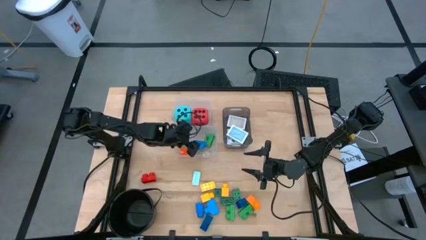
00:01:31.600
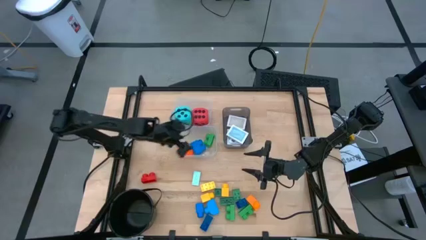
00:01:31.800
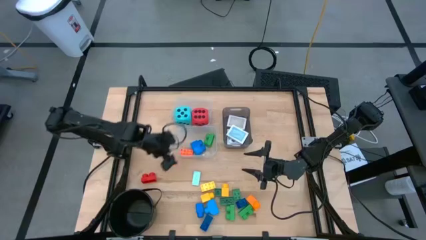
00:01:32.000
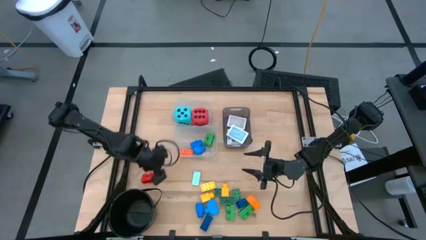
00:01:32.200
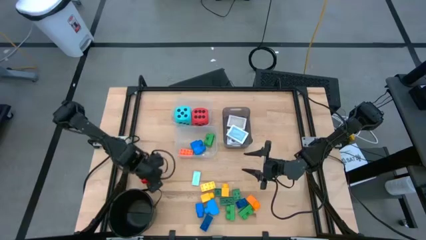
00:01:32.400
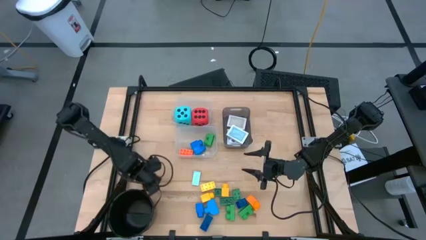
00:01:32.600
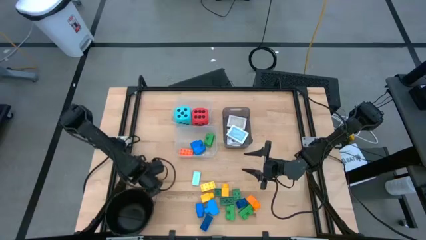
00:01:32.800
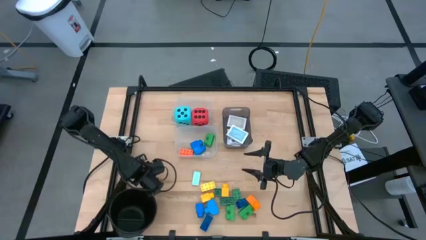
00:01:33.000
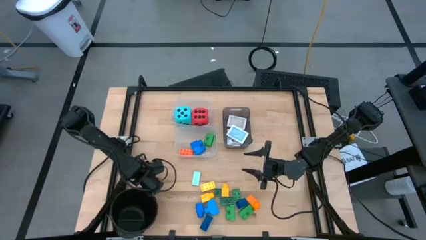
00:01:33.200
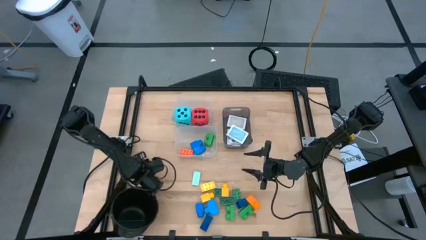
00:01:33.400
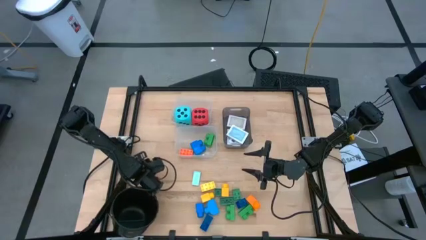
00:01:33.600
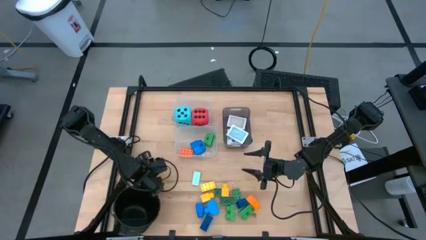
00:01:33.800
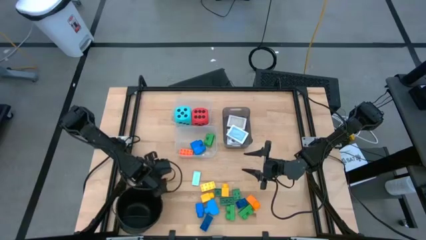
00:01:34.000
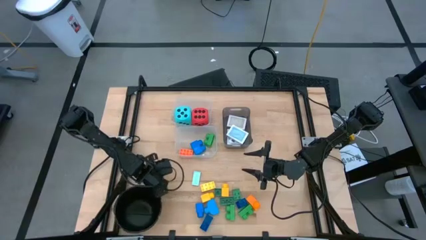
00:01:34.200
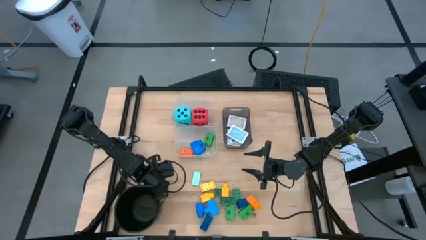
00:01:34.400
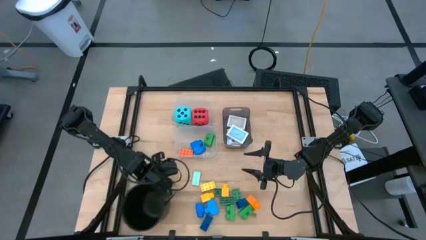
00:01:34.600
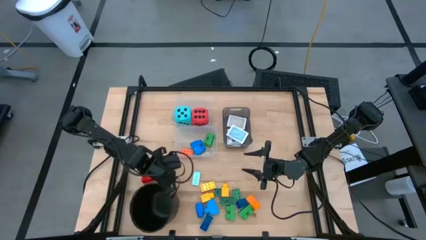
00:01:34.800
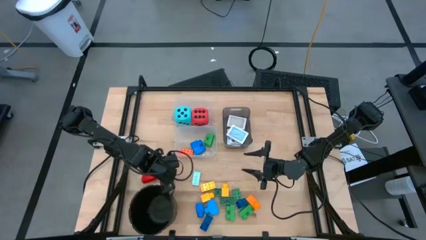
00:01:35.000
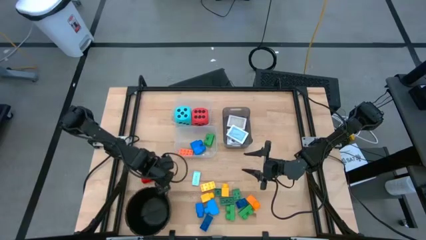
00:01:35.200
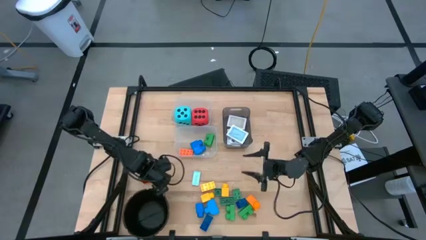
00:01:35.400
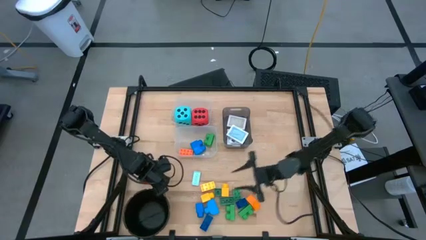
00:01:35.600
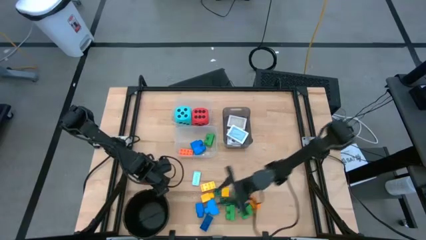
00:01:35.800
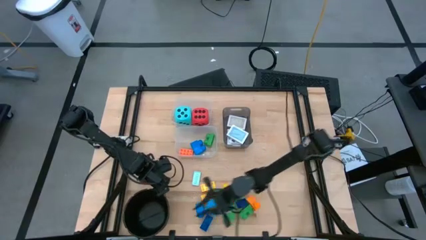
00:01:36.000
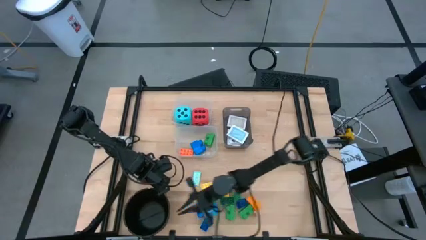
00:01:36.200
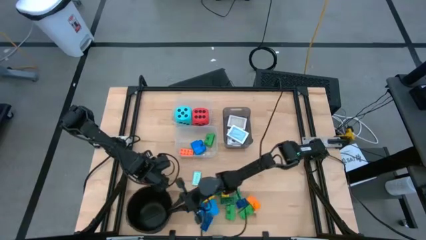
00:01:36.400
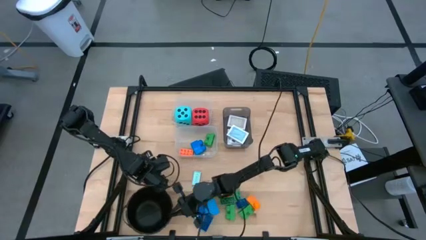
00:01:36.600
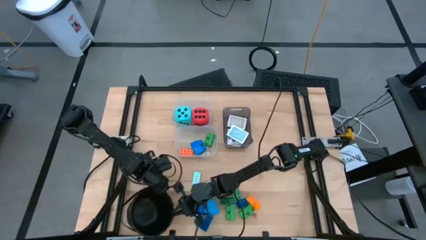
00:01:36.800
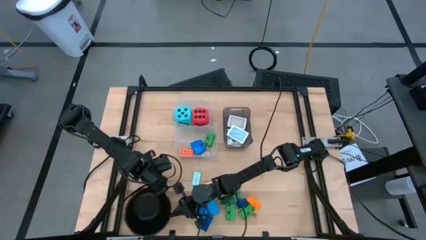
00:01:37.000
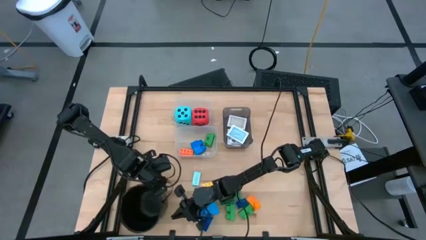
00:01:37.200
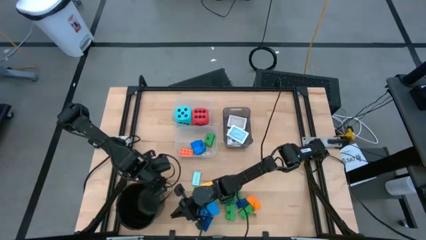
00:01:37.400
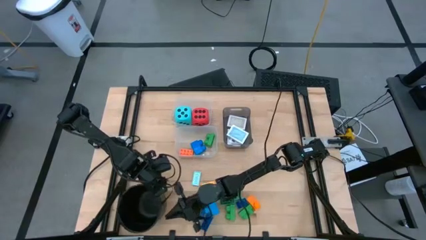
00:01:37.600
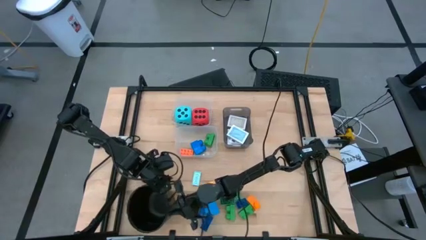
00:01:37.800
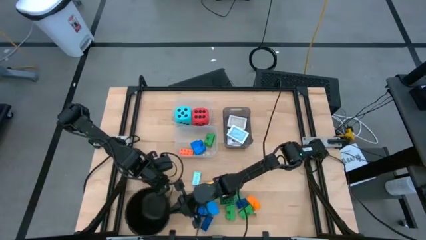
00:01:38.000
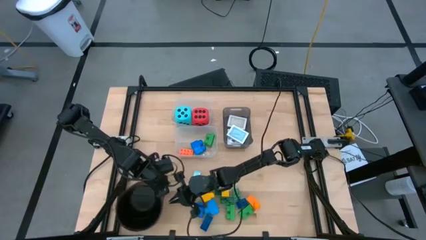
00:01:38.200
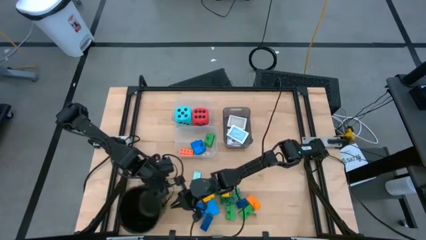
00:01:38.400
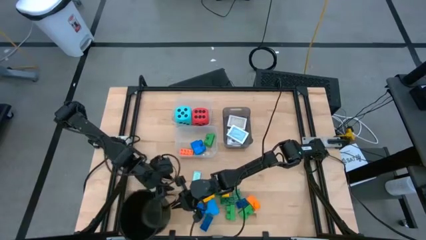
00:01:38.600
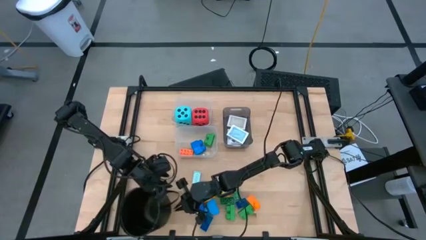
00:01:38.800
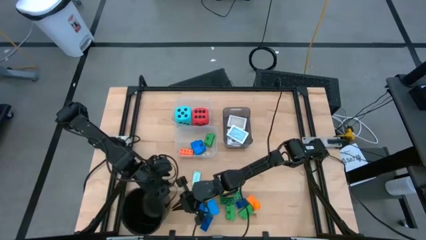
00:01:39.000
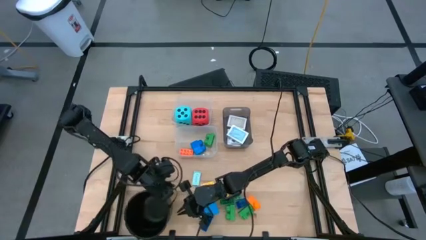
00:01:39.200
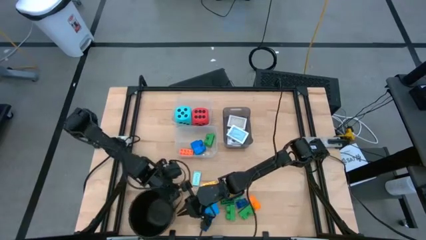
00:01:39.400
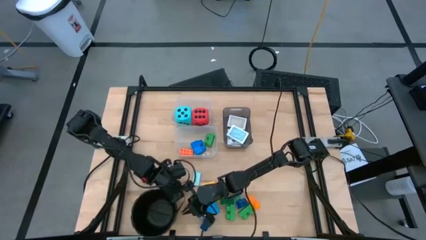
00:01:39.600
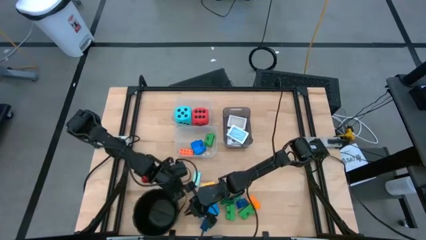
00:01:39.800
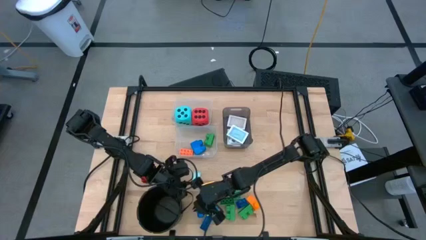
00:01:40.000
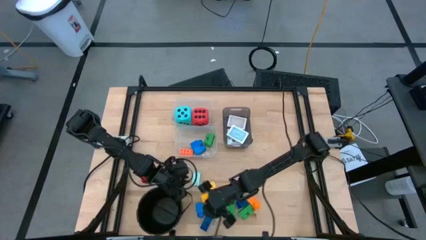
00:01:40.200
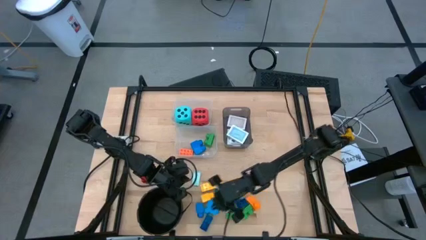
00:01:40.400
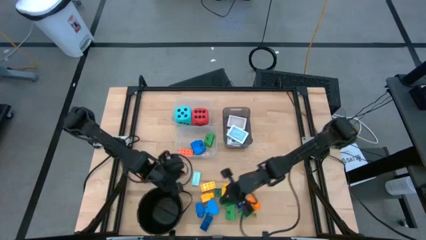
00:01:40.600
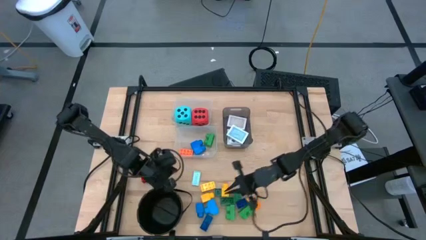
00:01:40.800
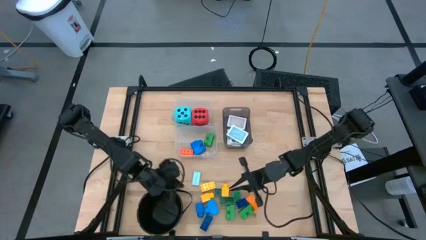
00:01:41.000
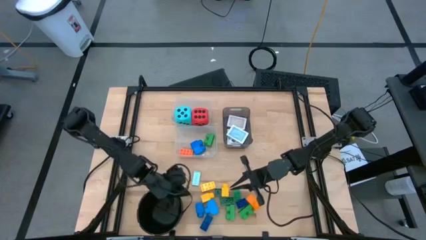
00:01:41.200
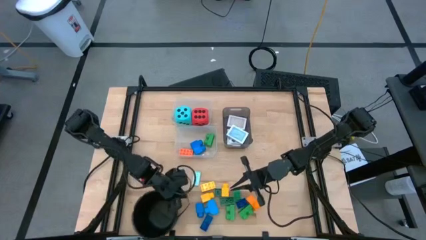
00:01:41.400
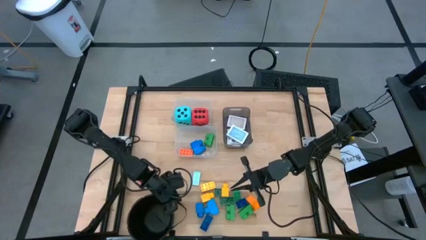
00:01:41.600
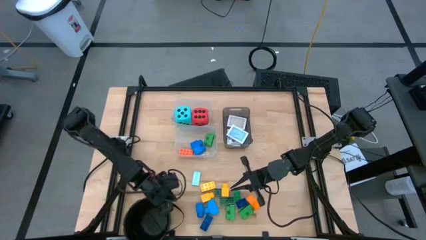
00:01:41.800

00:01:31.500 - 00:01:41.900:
Task: Pick & Place Toys
Adjust the black bucket on the table

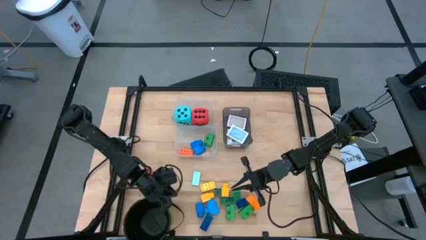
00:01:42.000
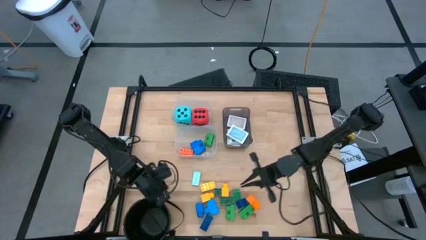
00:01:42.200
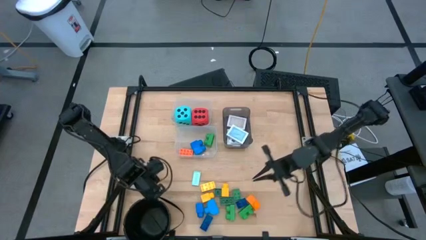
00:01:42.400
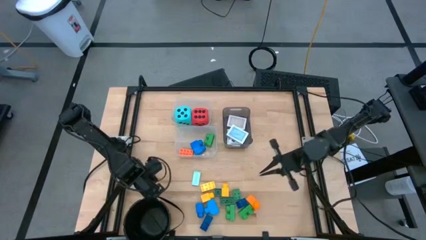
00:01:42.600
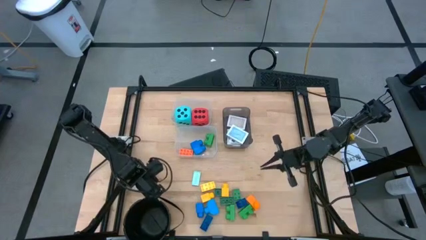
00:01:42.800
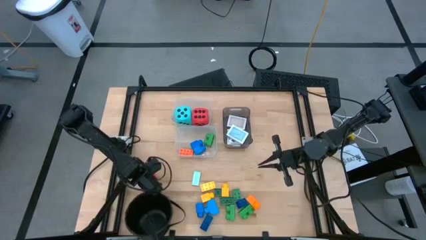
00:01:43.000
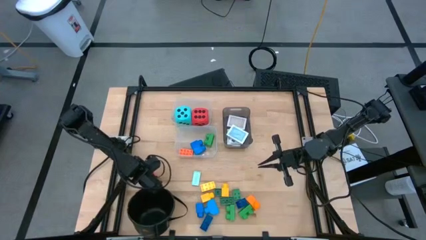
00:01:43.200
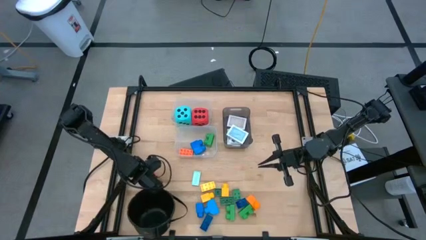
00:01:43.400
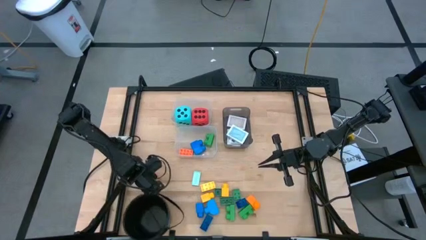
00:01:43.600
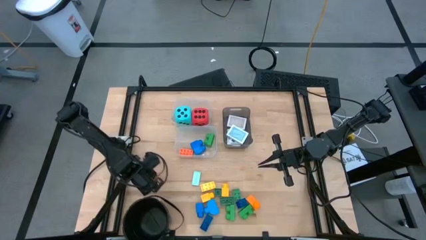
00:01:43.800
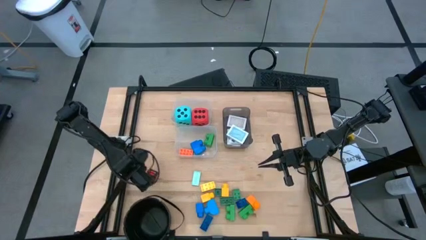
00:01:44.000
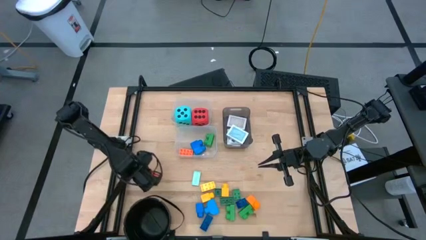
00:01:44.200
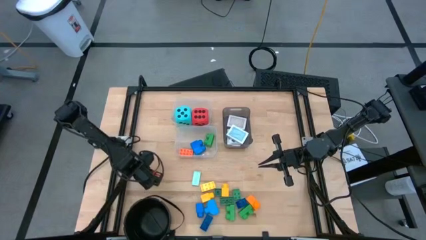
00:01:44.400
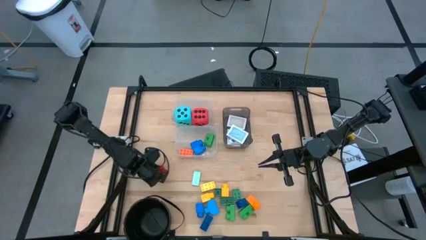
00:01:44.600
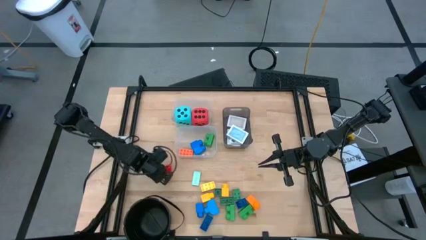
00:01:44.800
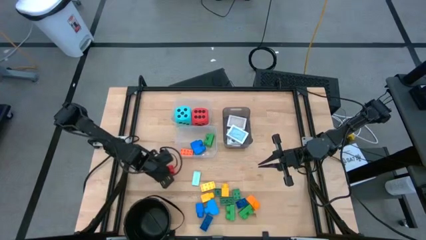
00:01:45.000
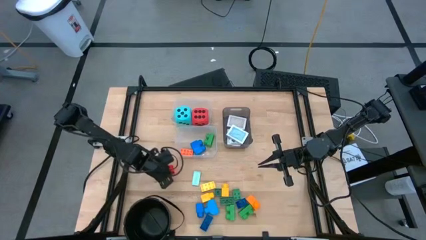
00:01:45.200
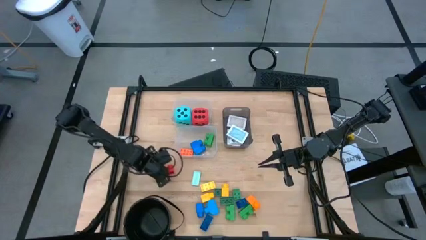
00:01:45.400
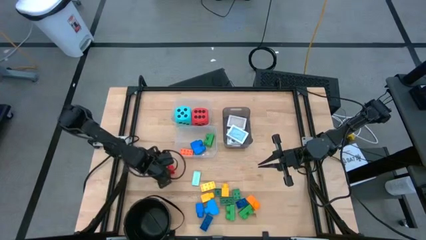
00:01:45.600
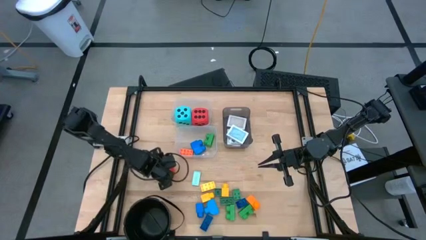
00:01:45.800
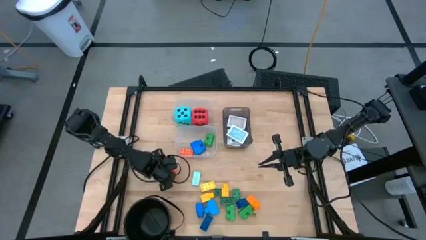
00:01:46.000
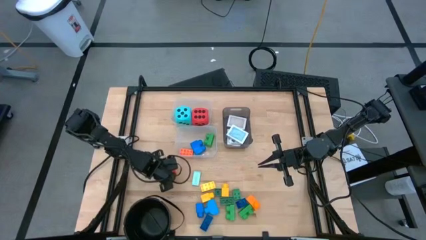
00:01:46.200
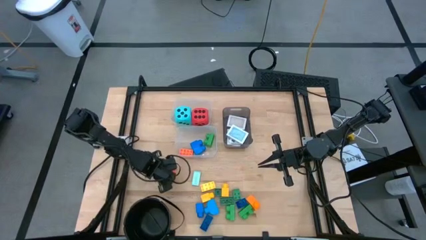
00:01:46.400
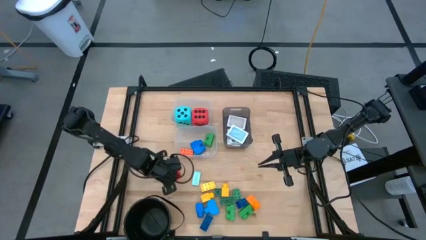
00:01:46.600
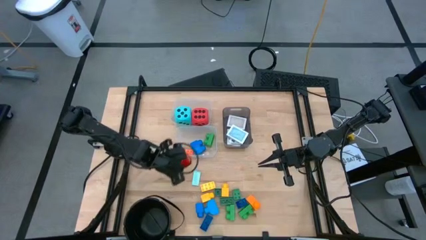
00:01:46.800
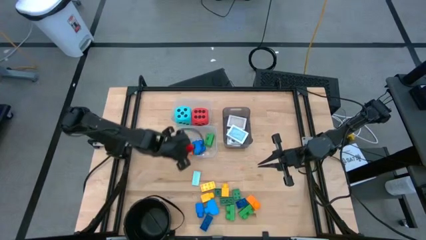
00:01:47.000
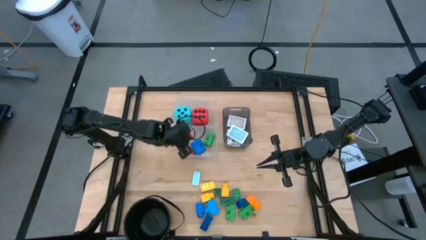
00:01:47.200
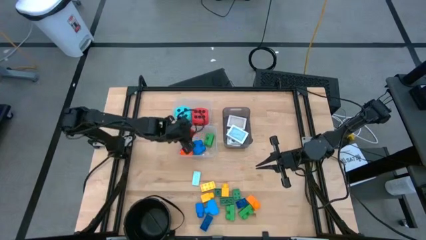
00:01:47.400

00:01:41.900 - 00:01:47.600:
Put the red game piece into the bottom transparent bin

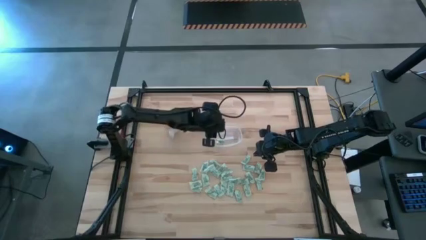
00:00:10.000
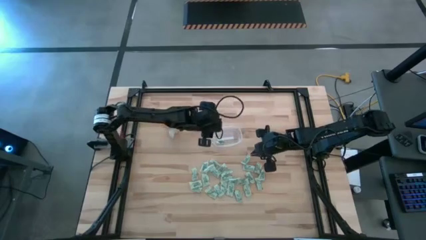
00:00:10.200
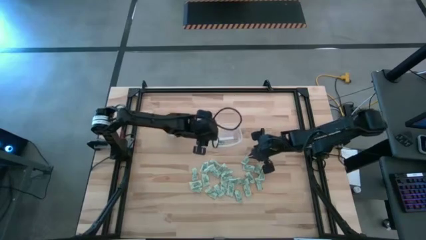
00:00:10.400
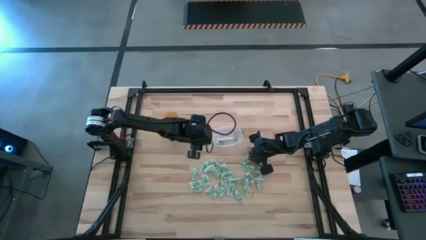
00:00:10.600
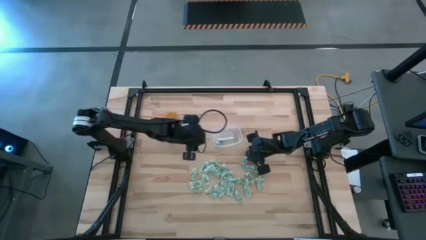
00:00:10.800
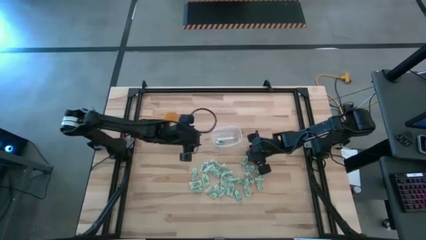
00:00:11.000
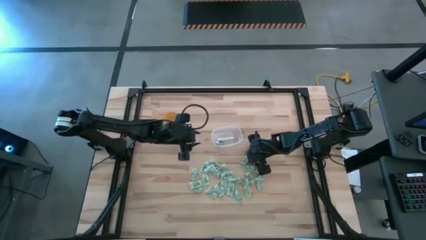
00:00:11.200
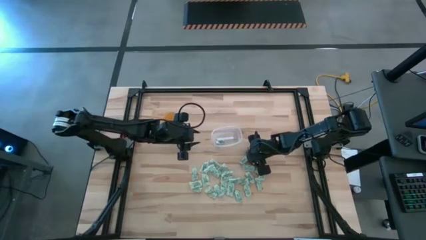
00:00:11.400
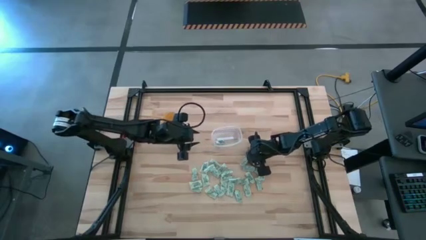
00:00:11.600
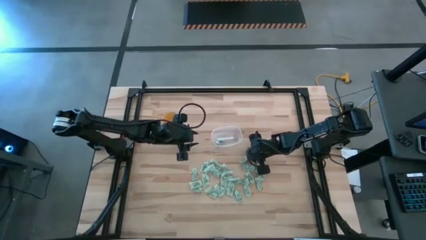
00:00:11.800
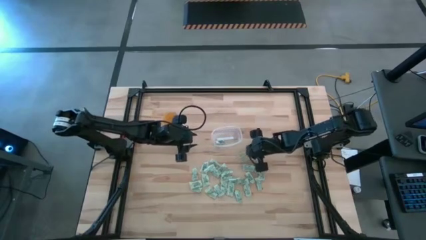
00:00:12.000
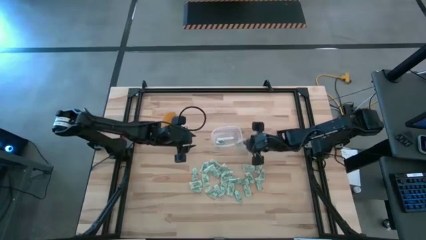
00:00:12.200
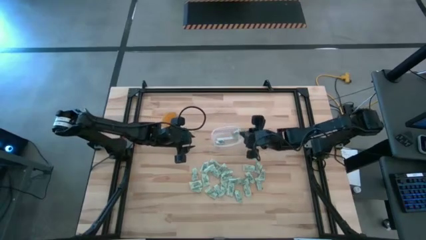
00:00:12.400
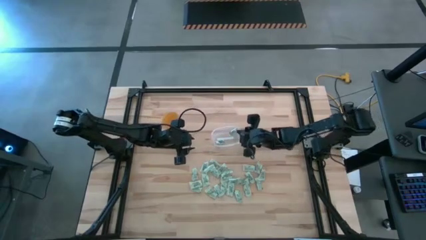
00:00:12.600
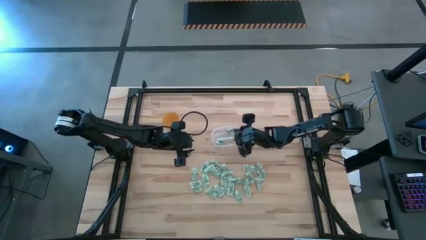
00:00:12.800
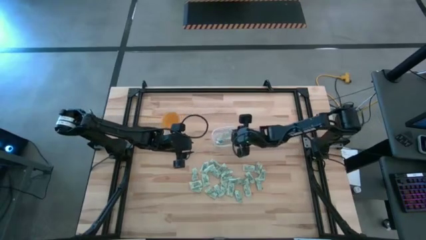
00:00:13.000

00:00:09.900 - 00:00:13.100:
Task: Pick and place Stevia / Truvia into bins
Put the stevia packet into the transparent bin
